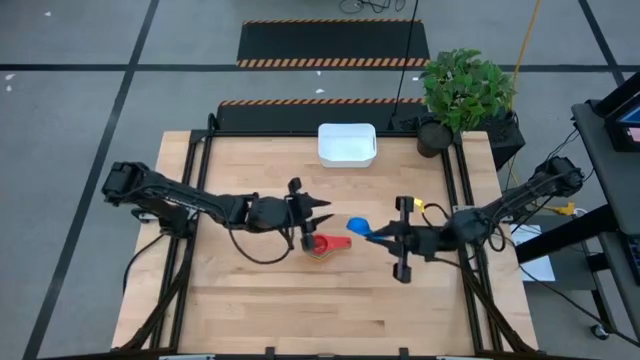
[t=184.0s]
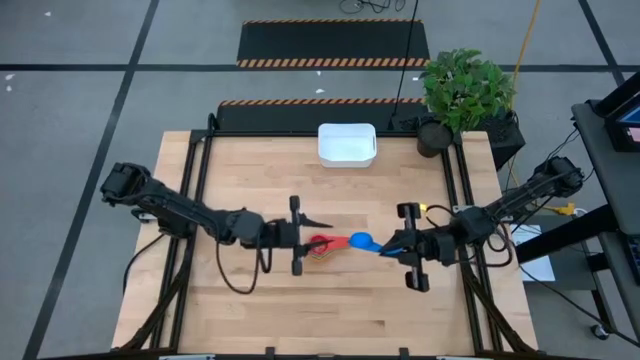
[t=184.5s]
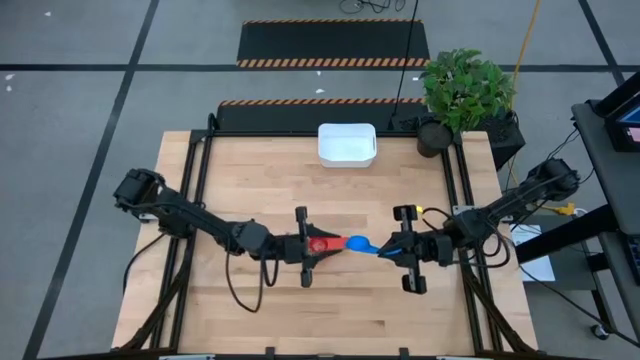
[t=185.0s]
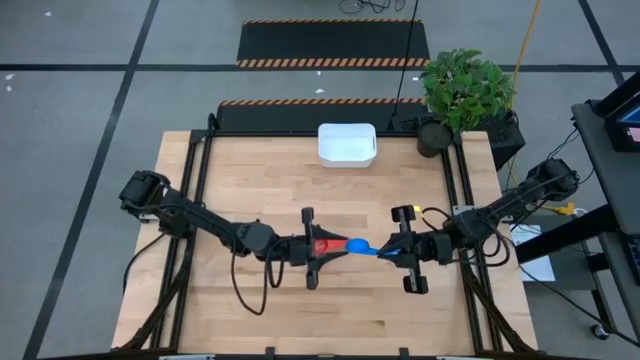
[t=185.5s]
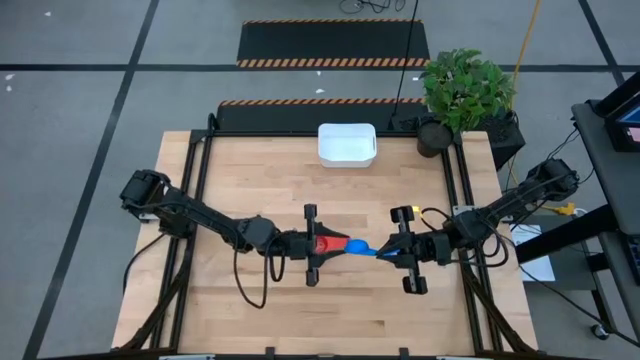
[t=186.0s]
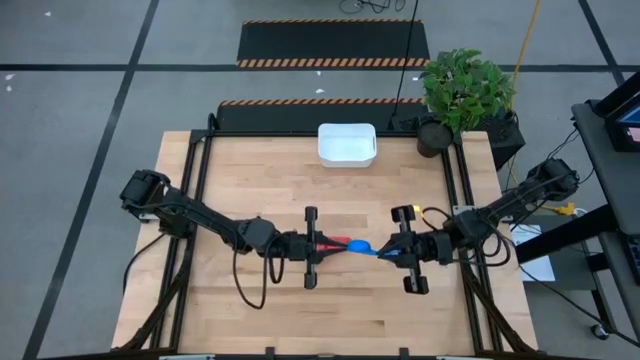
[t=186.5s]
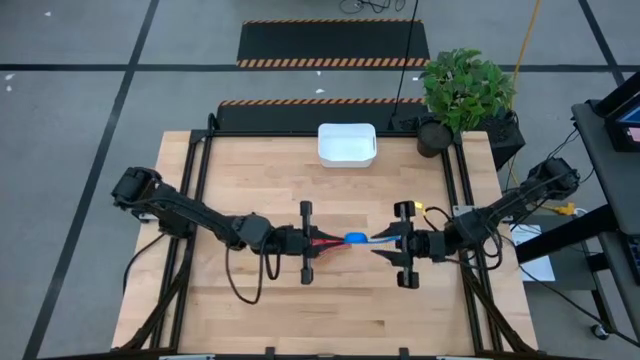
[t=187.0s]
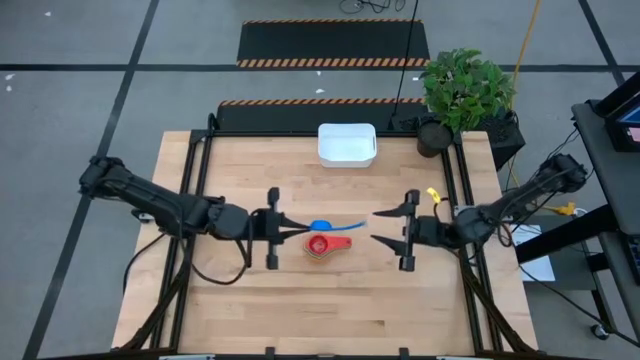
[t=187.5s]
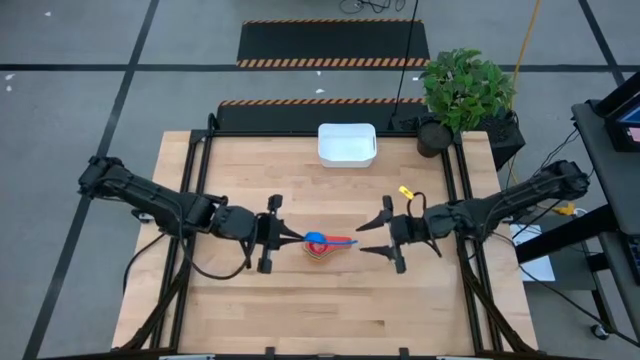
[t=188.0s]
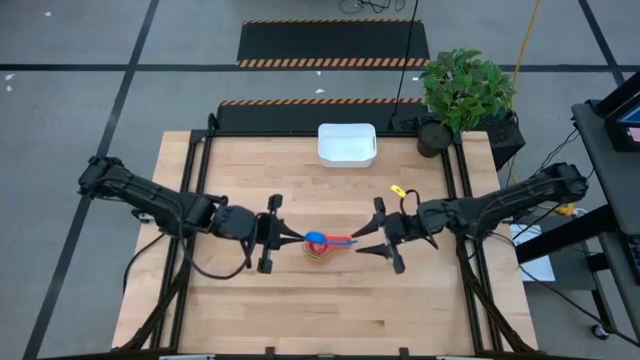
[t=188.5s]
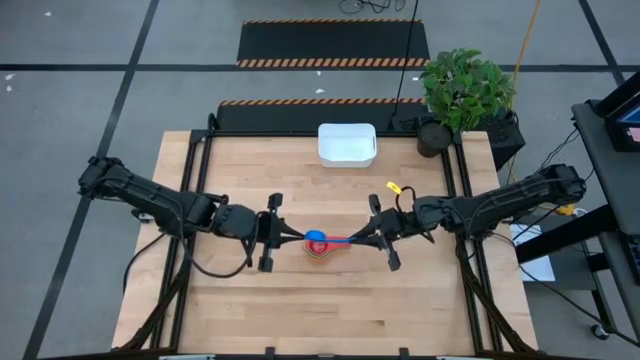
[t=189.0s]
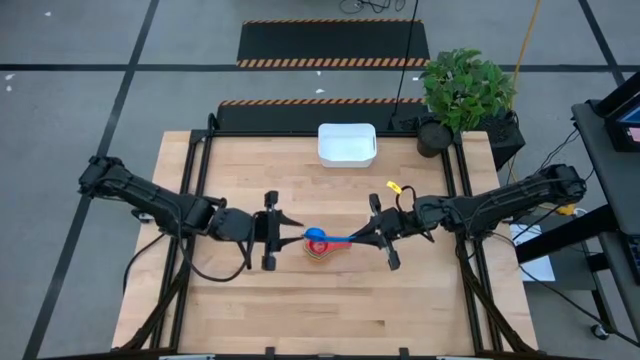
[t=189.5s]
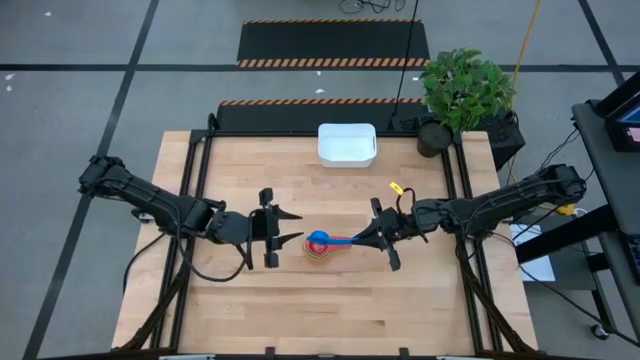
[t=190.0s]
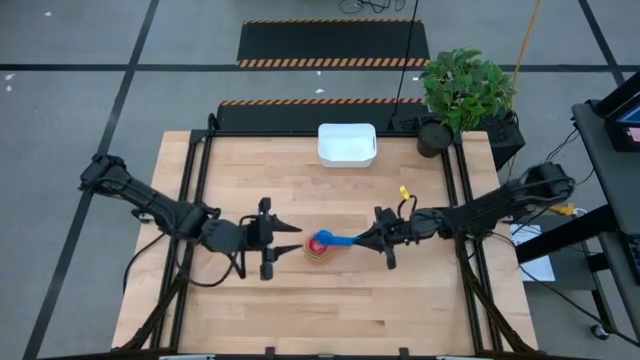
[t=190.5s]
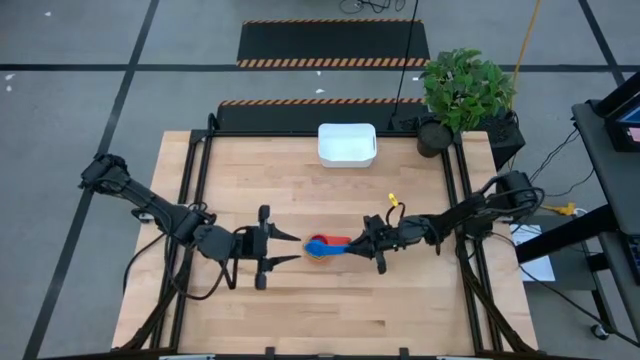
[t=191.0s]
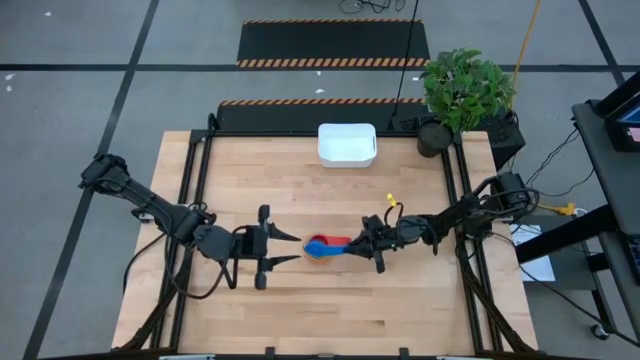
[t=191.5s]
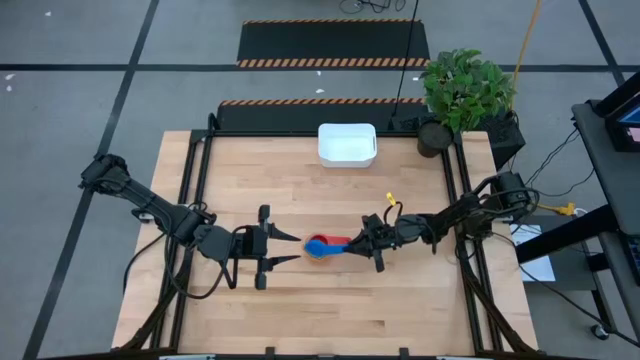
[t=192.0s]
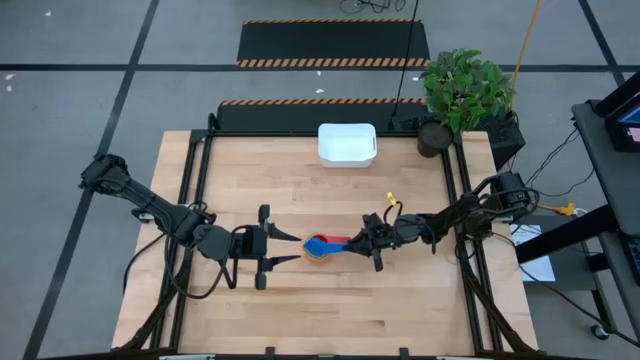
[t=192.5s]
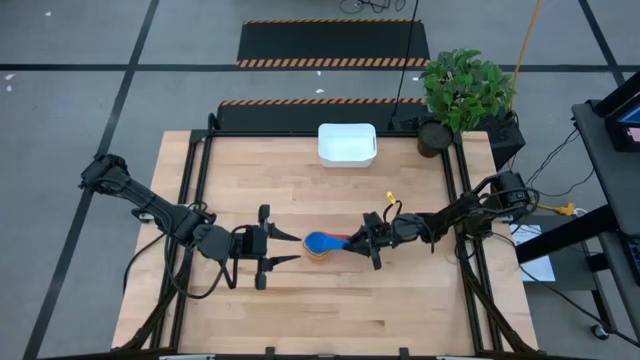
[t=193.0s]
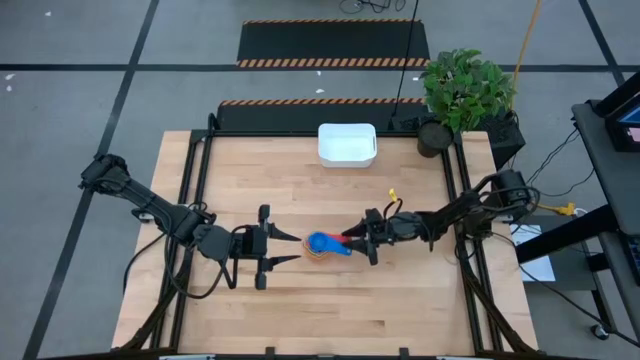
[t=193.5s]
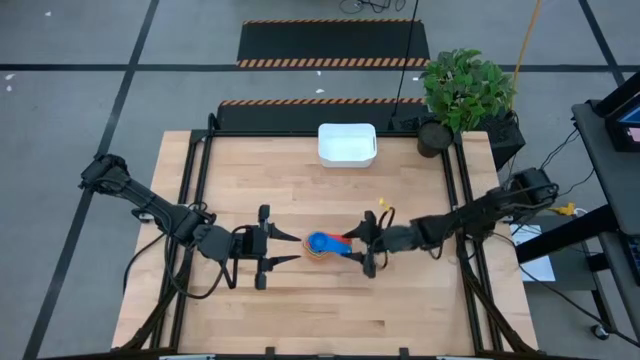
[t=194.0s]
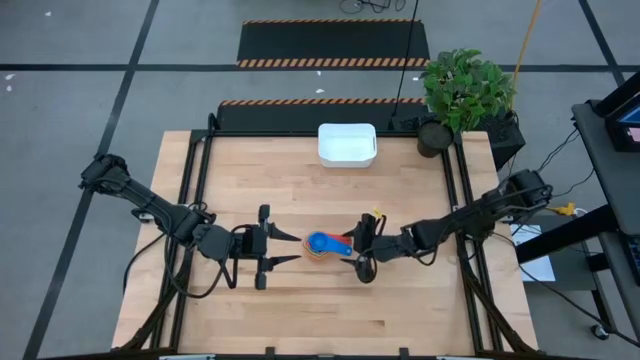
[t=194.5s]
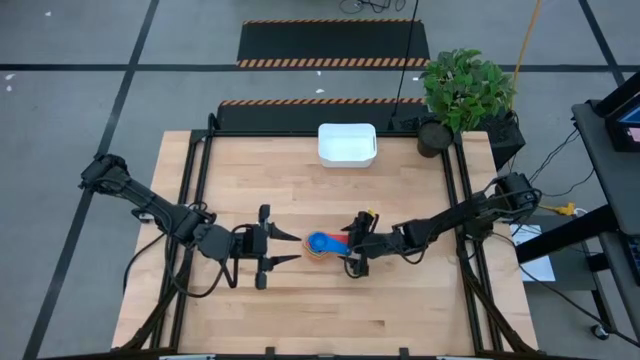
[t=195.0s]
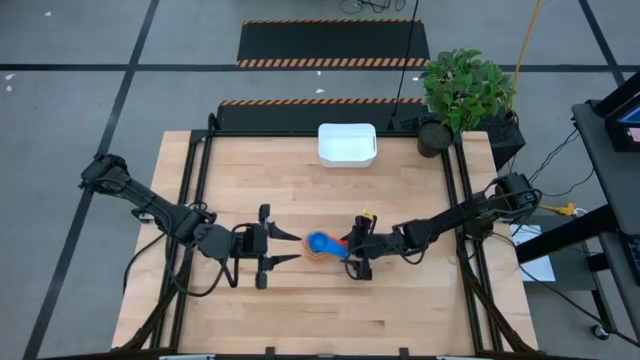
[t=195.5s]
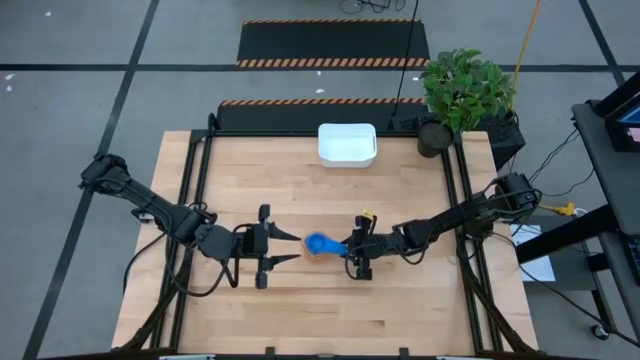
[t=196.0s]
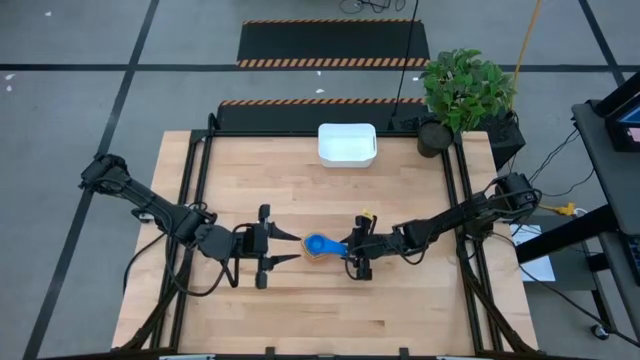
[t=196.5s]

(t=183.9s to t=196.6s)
Task: Nest measuring cups in basket
Stack the blue measuring cup into the red measuring cup

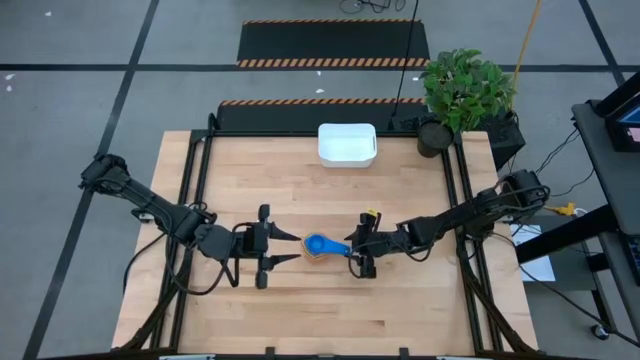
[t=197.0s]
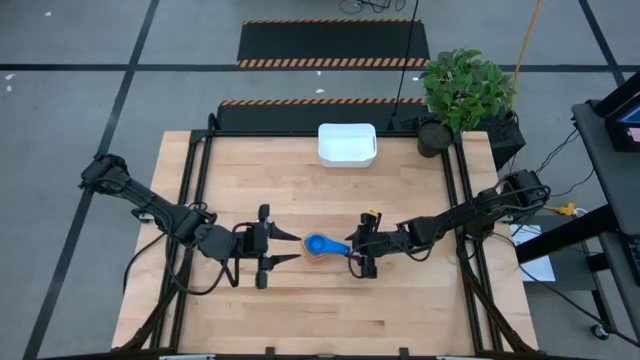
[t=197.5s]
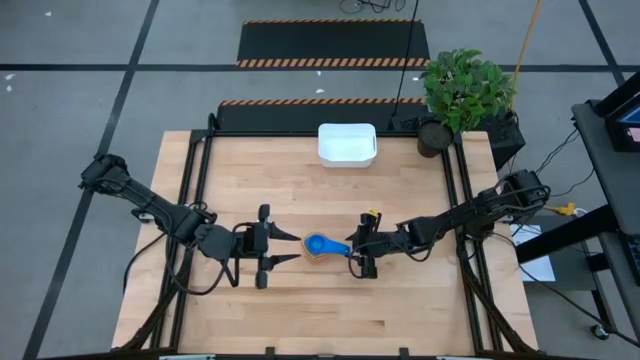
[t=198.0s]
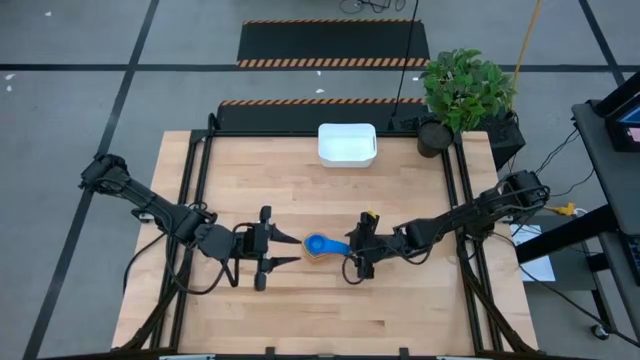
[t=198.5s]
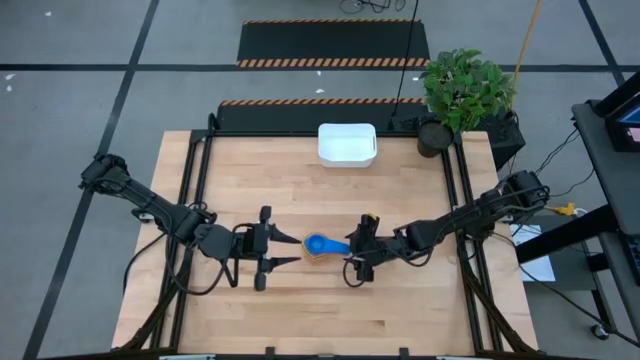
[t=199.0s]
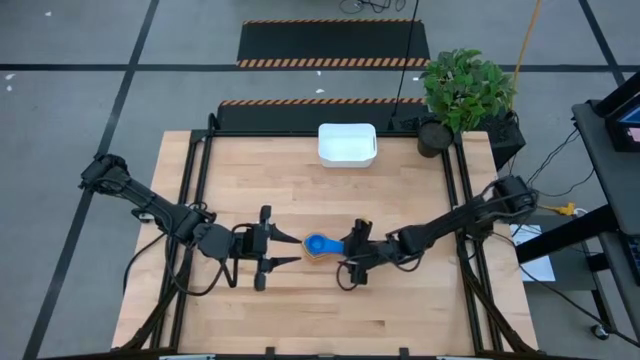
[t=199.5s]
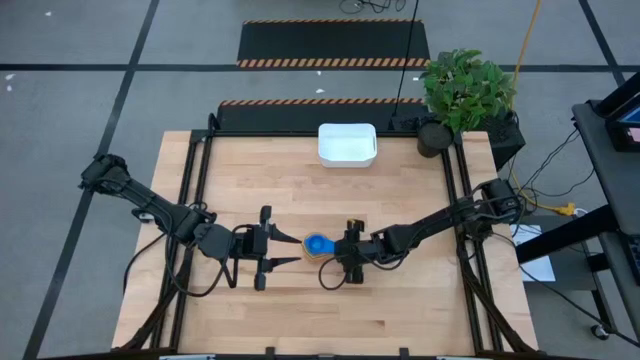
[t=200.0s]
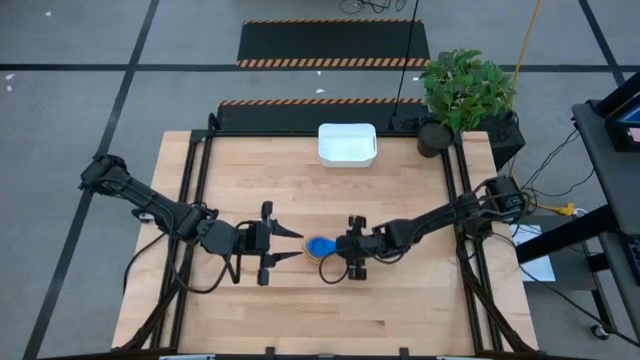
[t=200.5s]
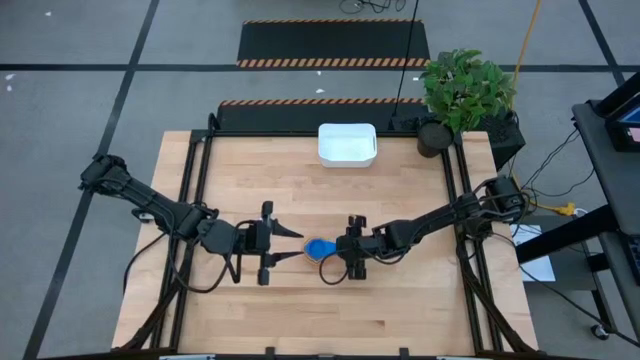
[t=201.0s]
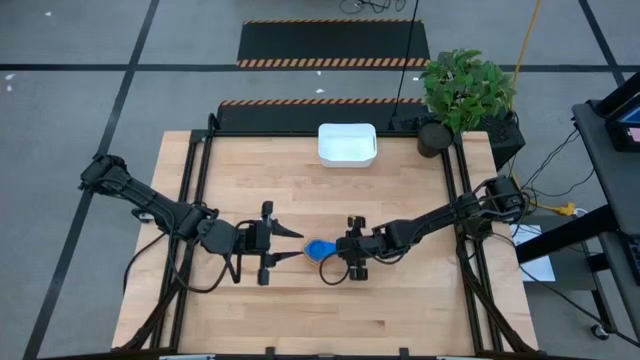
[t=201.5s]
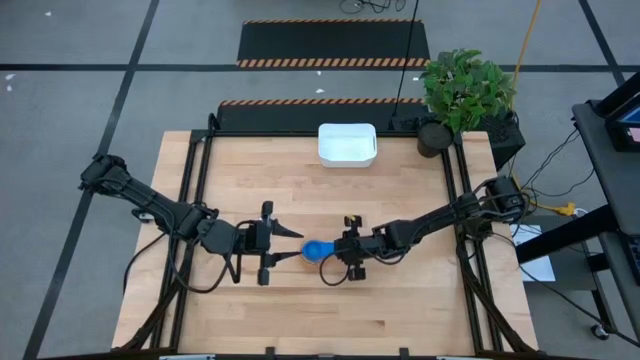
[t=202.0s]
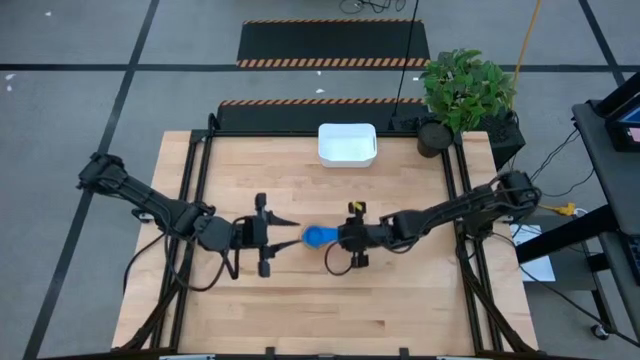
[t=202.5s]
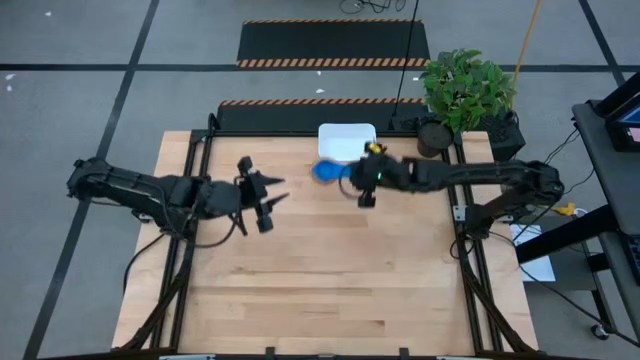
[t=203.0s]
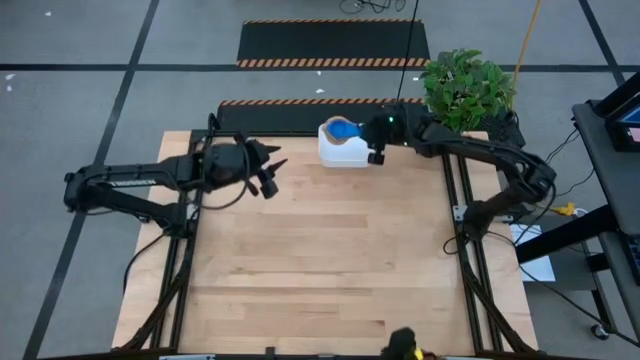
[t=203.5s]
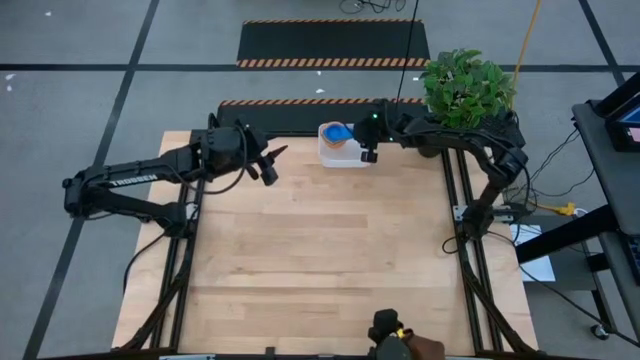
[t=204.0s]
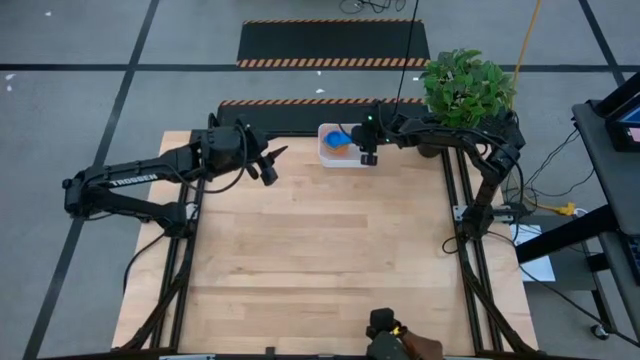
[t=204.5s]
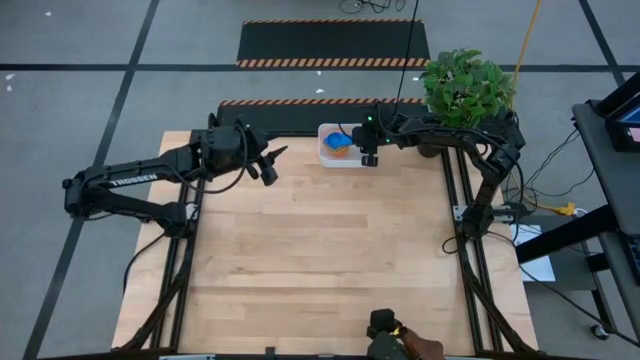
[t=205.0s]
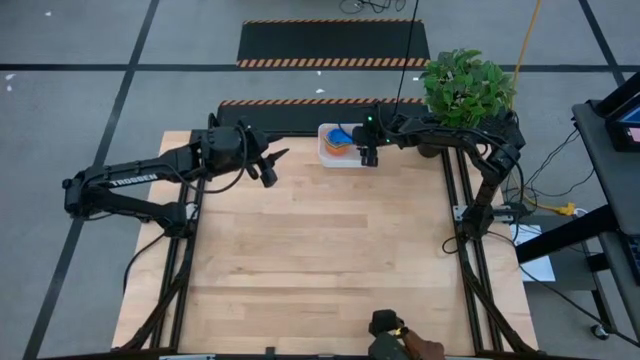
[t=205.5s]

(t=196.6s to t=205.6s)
Put the nested measuring cups into the white bin
